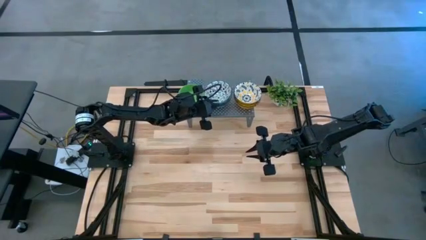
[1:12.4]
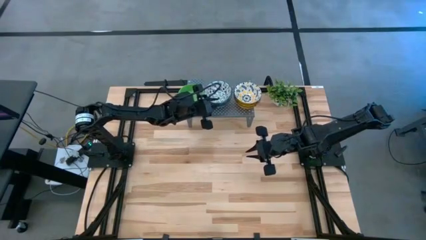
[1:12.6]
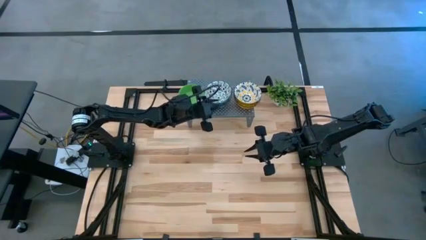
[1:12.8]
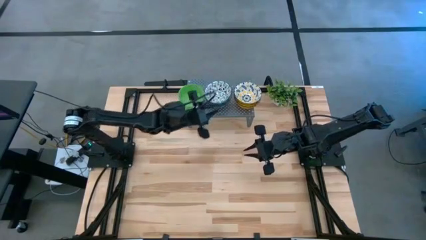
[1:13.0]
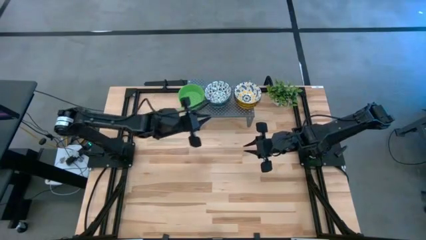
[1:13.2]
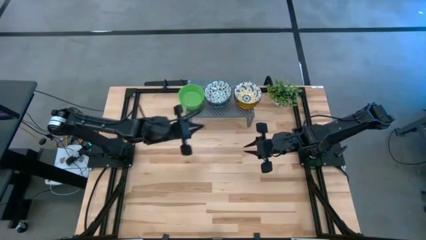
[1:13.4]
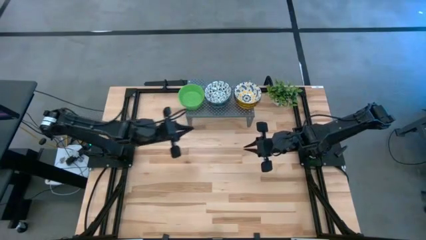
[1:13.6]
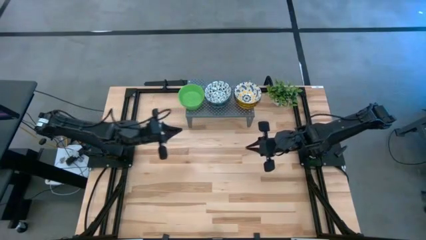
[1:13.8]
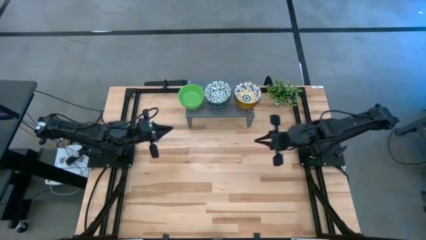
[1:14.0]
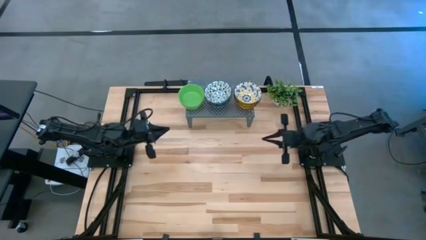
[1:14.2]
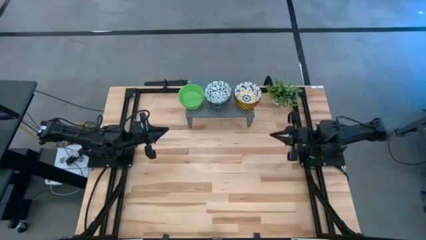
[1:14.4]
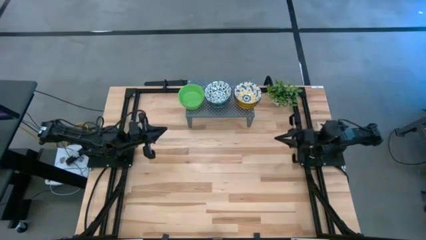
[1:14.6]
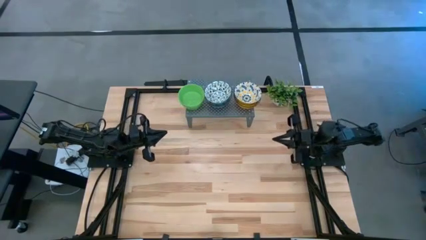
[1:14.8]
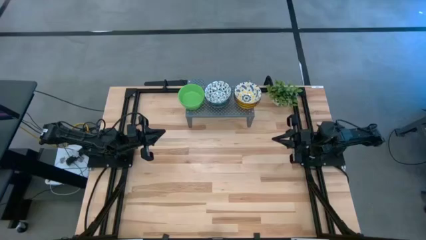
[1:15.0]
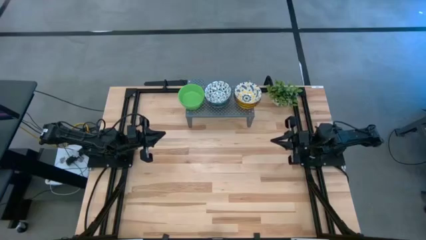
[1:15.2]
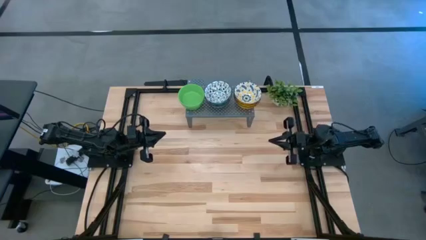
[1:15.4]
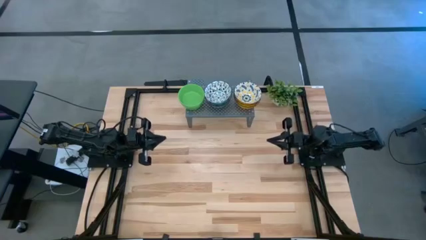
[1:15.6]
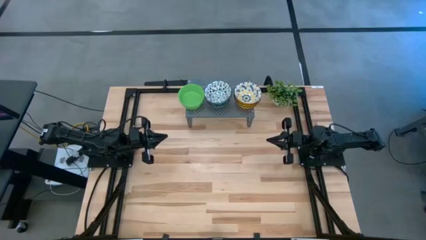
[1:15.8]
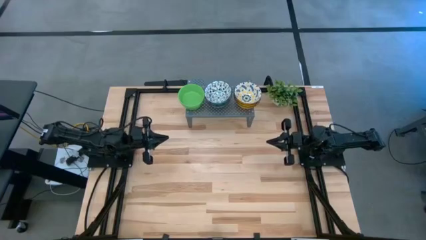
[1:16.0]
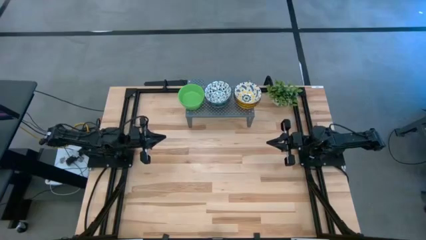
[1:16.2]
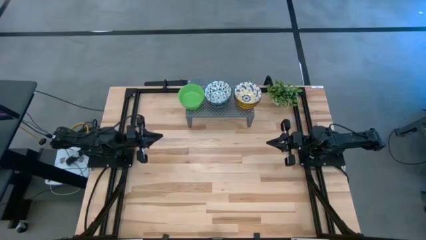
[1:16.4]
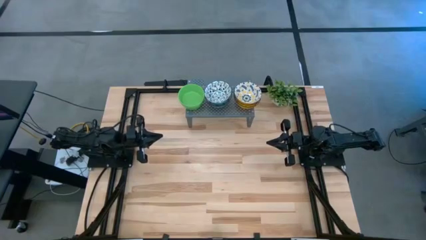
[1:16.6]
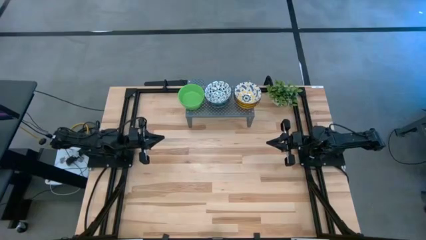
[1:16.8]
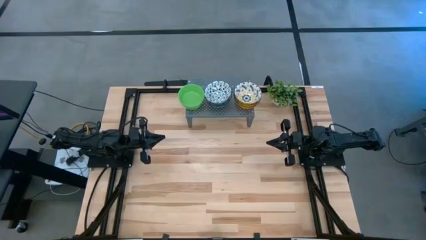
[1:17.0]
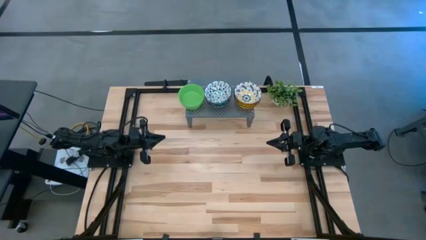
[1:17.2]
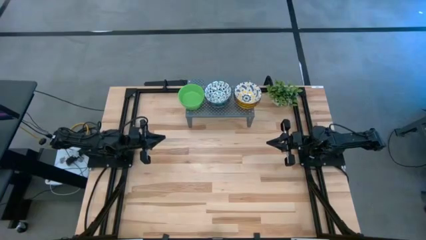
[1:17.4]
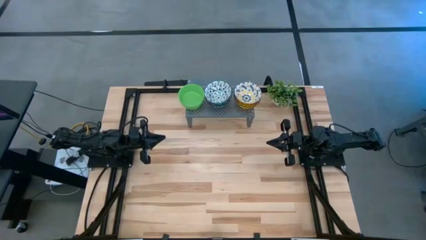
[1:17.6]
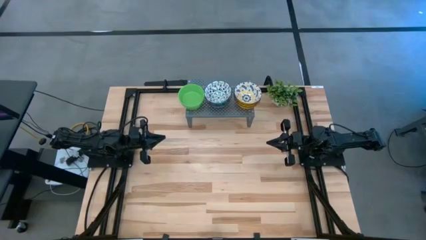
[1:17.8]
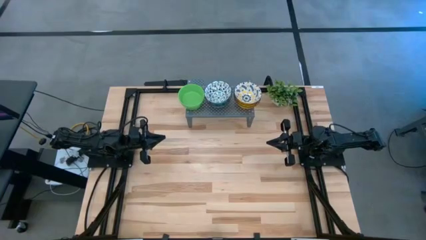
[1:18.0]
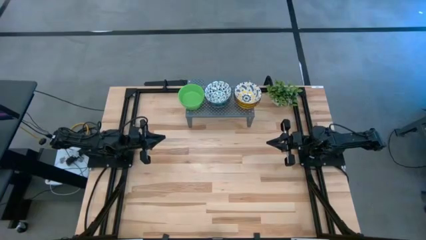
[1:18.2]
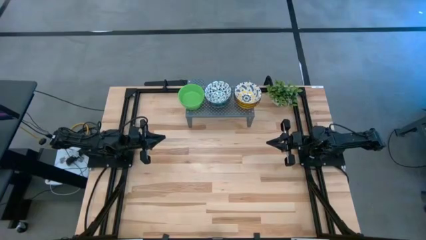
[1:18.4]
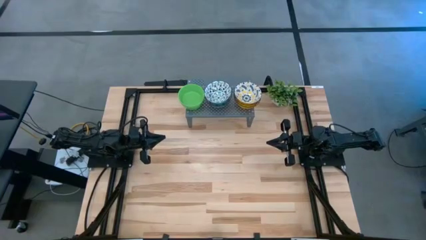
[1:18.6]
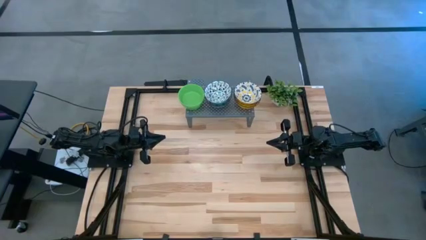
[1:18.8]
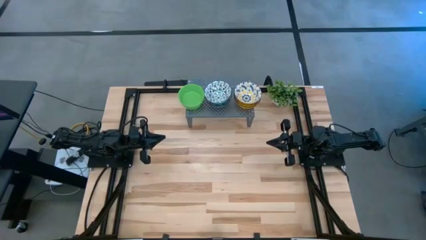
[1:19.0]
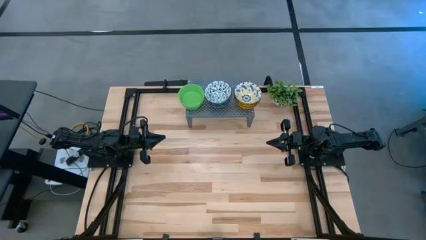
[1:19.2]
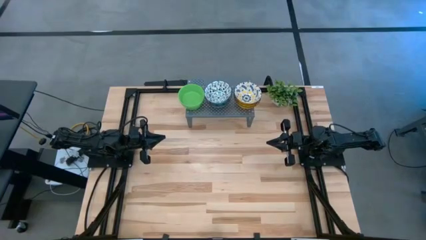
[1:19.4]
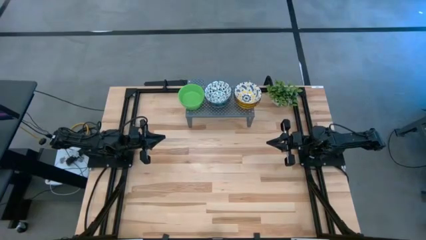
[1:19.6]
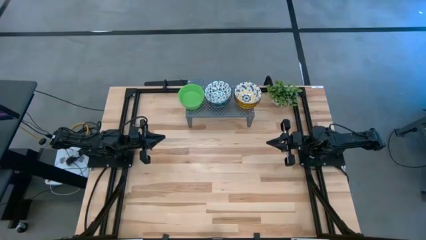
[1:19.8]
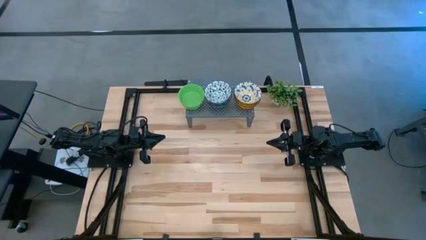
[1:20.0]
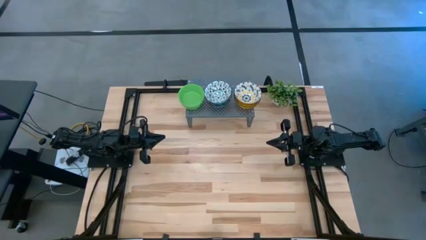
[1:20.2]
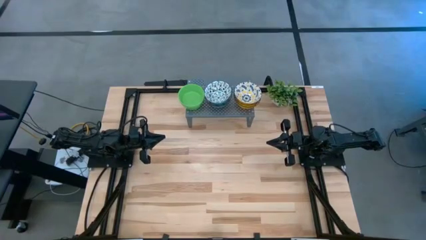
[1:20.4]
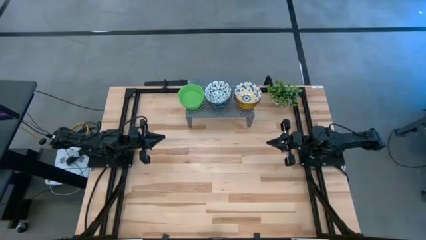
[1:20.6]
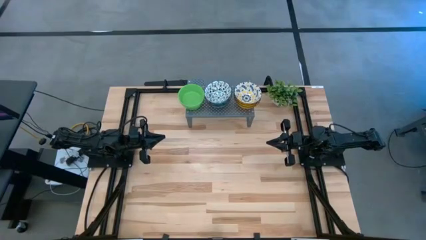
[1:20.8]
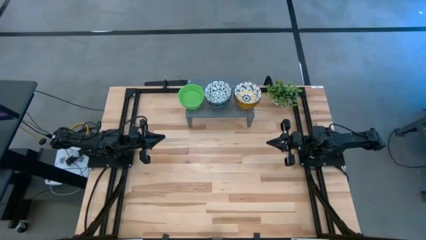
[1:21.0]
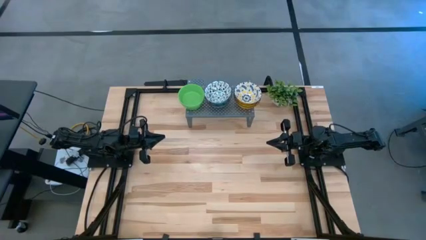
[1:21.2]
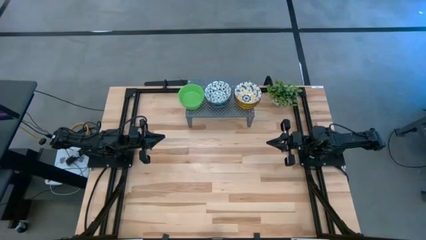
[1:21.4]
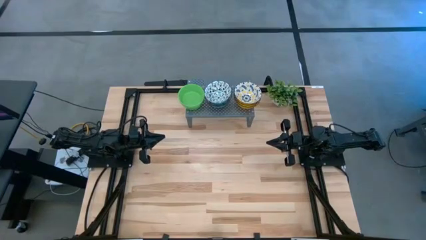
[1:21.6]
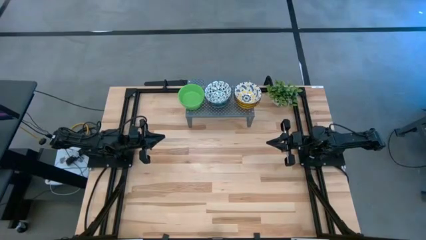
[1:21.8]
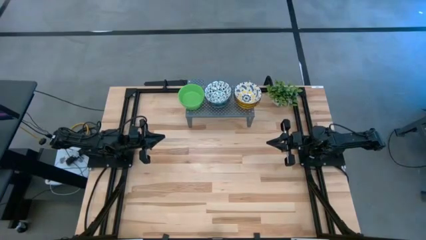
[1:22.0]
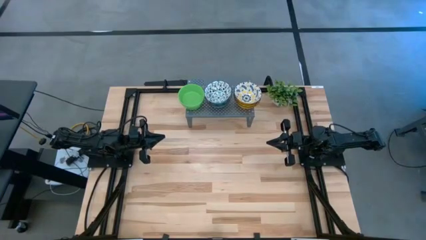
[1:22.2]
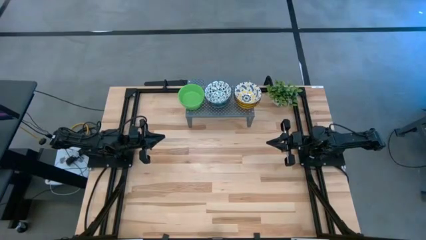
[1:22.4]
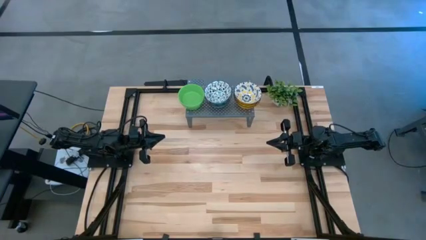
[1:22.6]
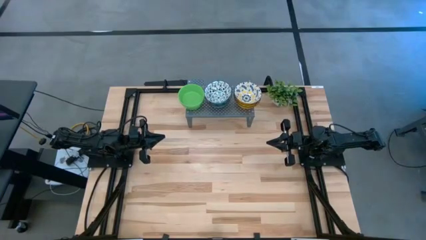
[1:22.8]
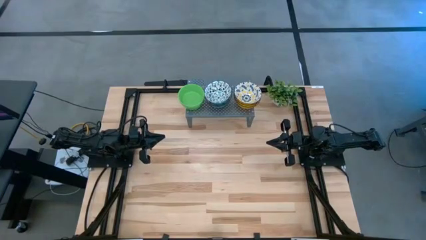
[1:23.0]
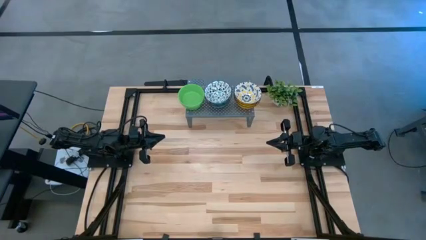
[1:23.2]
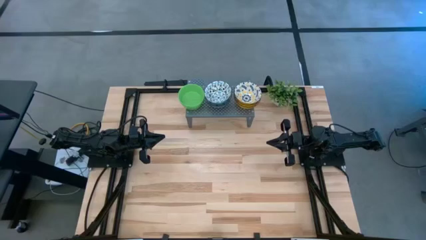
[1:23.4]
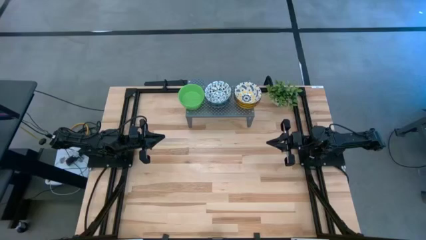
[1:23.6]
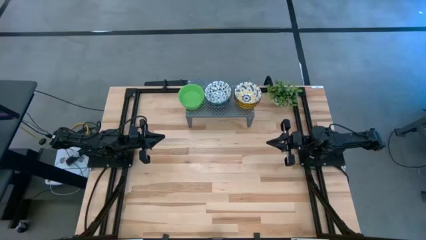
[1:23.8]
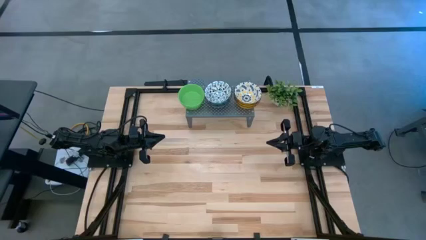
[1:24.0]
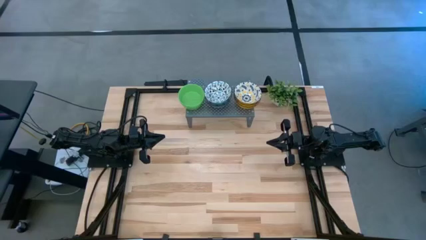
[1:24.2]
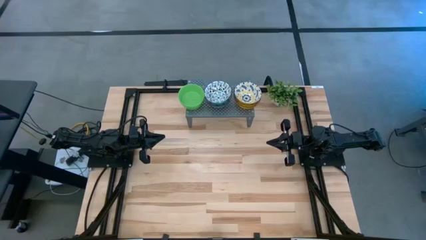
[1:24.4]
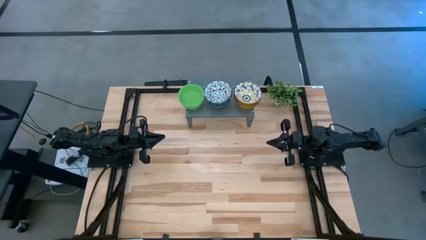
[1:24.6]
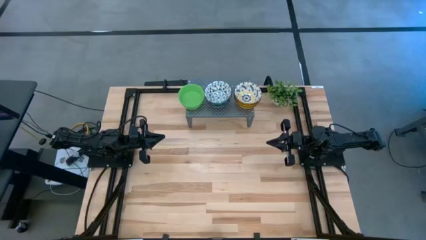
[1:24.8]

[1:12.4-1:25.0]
Task: Pick & Place Mini bowls
Return to Home Position

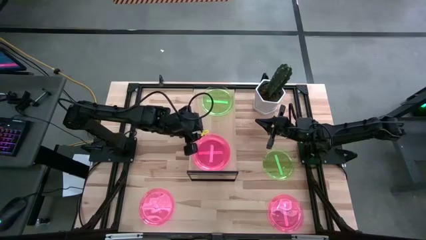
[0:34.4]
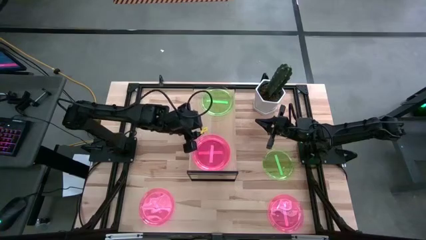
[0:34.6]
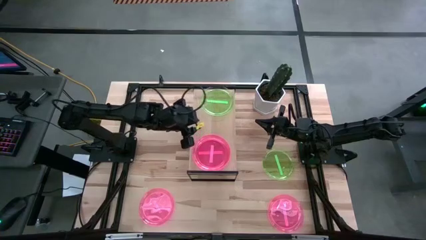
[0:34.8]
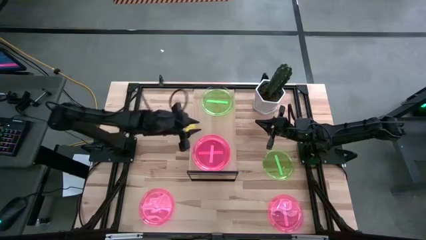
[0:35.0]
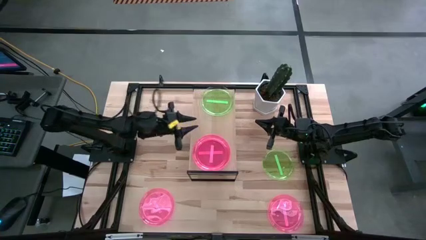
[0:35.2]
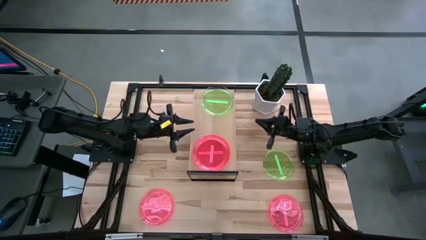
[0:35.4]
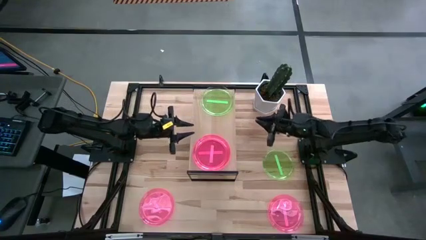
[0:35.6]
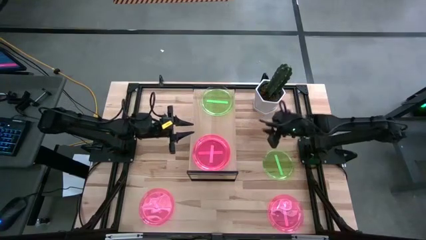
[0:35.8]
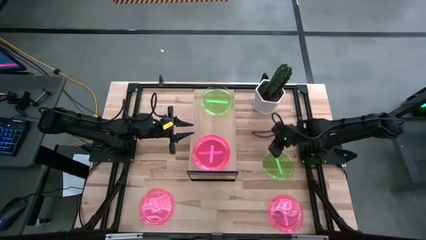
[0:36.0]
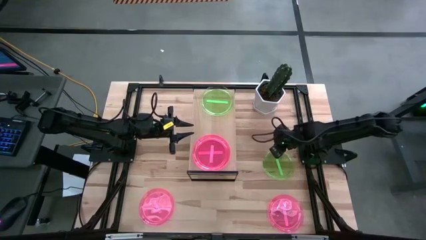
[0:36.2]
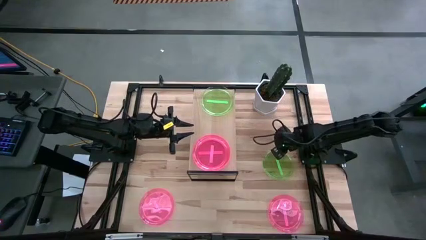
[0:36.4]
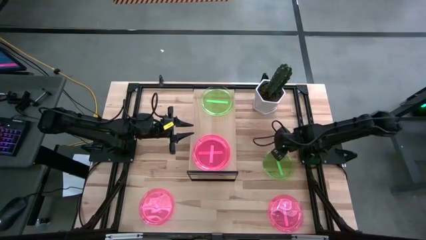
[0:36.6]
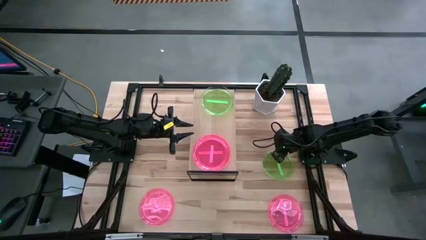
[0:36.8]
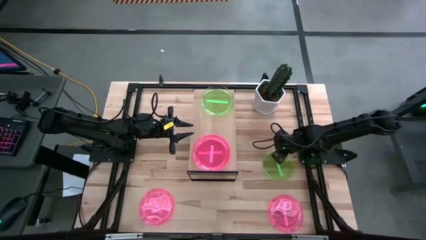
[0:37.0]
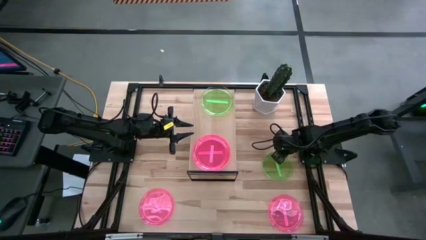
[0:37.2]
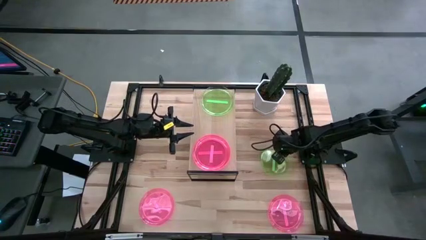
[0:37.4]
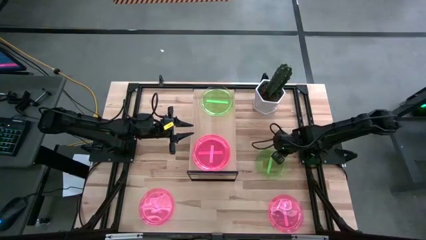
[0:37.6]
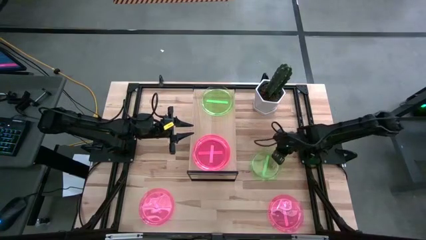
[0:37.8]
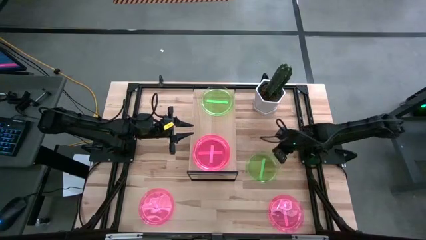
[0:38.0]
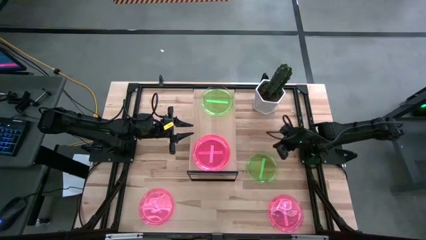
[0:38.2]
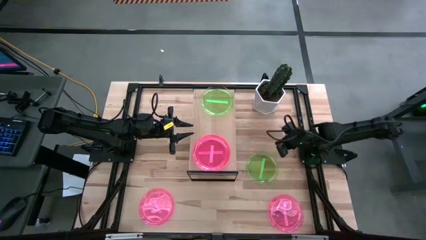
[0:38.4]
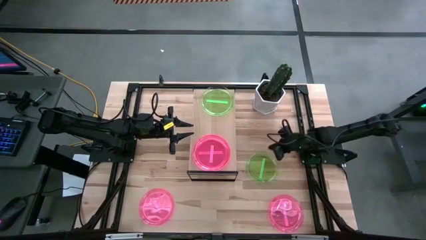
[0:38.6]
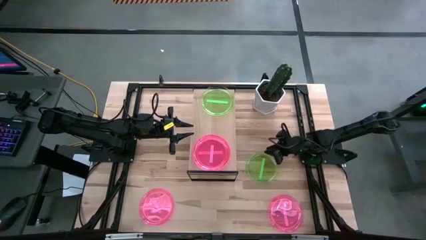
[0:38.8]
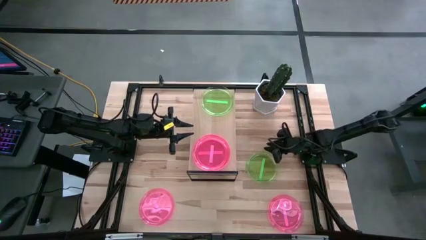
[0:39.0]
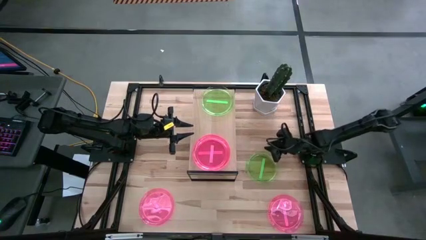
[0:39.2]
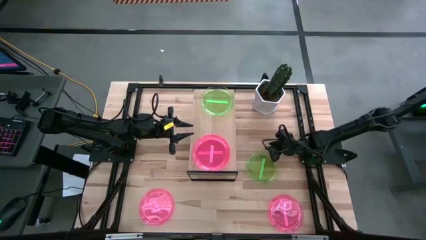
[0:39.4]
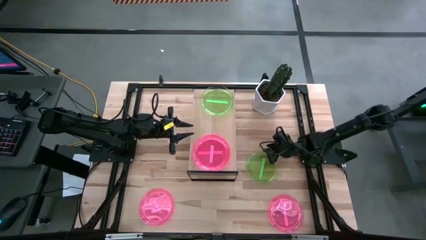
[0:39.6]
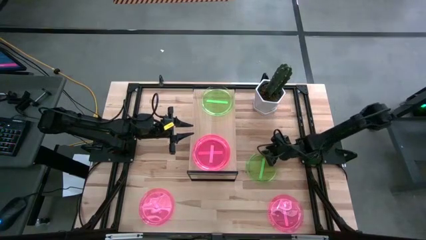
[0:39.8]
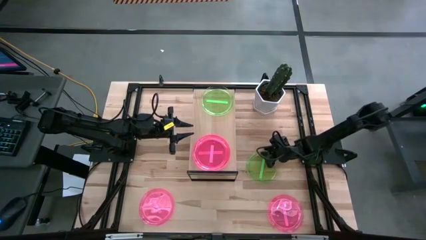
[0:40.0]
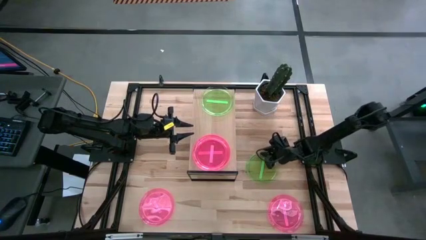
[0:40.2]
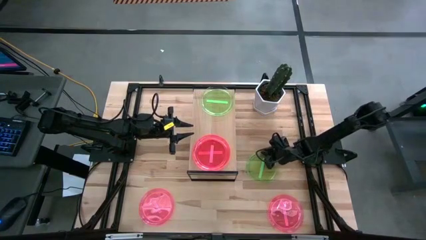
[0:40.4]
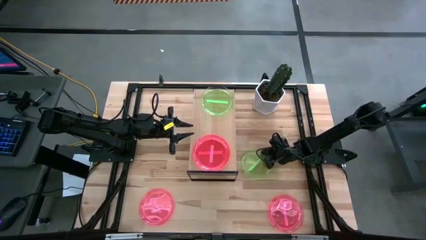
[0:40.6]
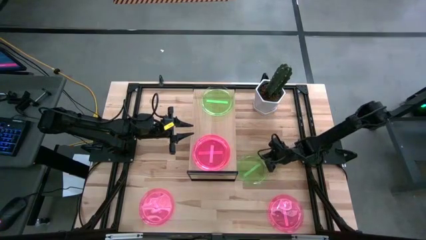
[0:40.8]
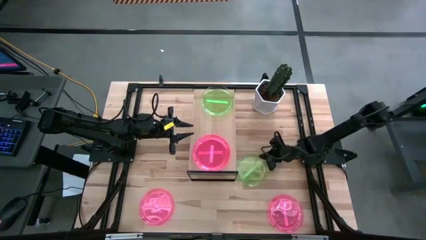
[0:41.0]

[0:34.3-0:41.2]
Task: Place and stack plates onto a shelf
Stack the green plate on top of the green plate on the shelf
